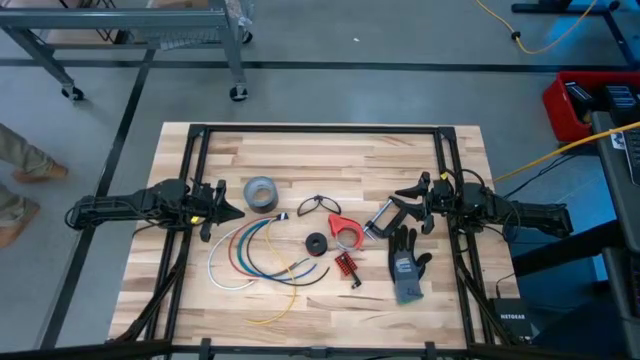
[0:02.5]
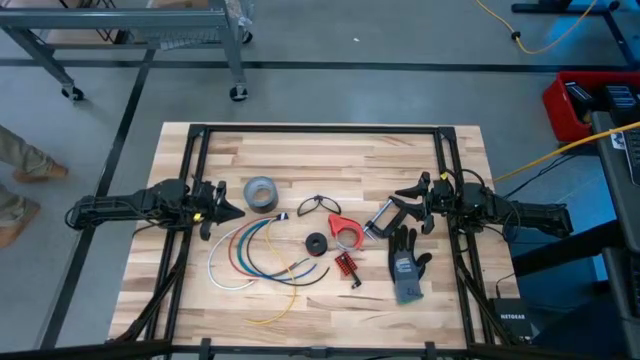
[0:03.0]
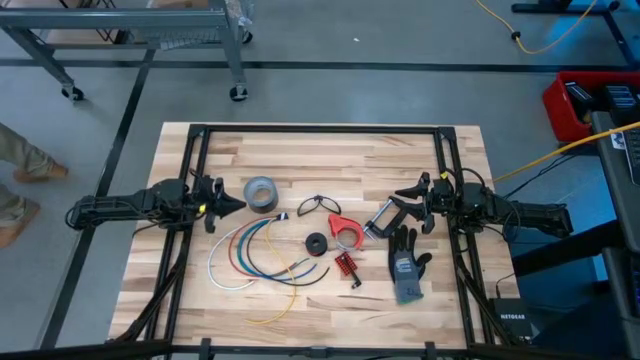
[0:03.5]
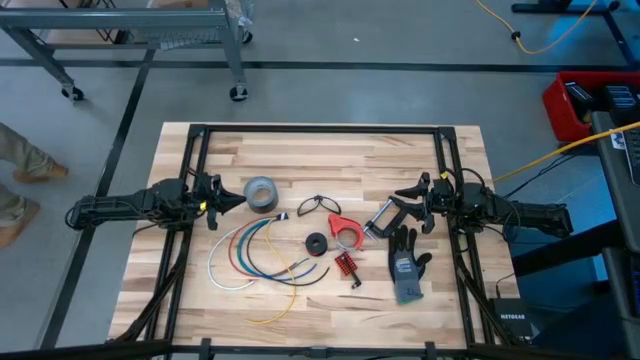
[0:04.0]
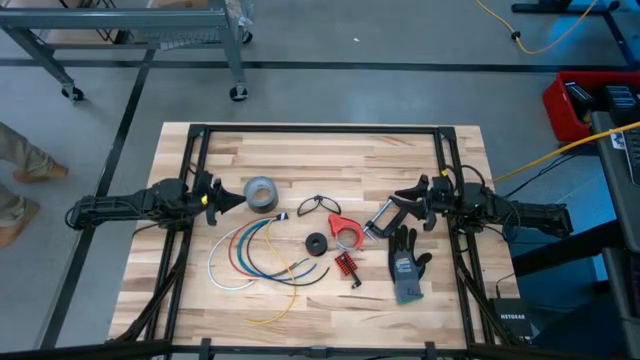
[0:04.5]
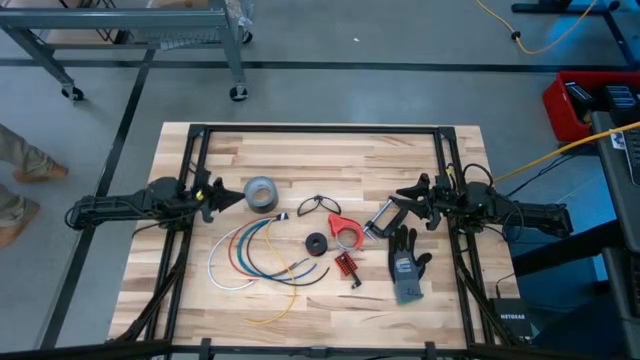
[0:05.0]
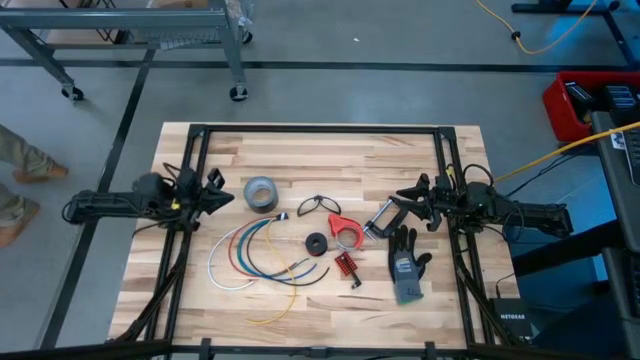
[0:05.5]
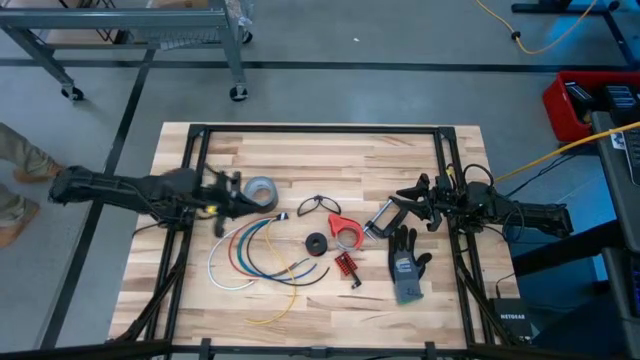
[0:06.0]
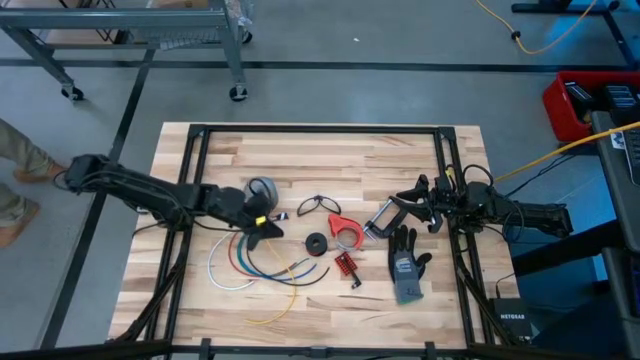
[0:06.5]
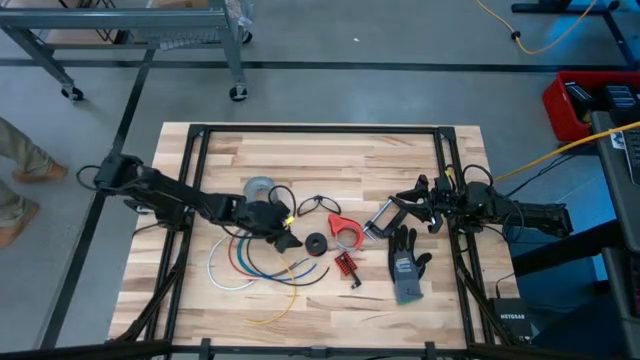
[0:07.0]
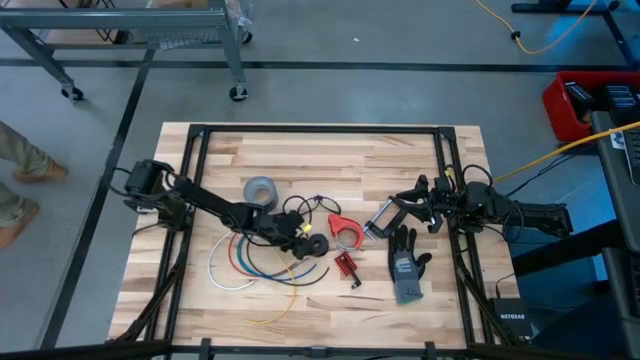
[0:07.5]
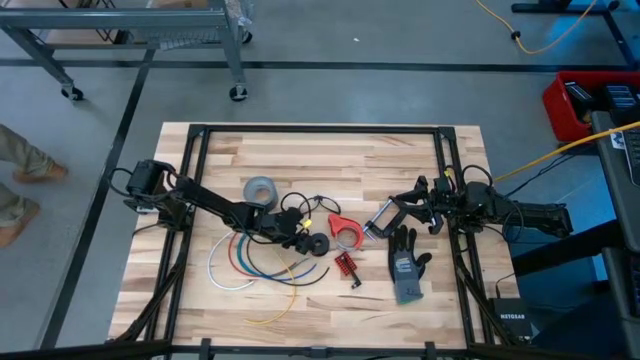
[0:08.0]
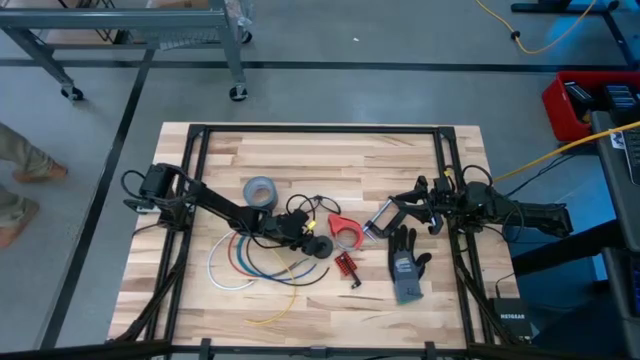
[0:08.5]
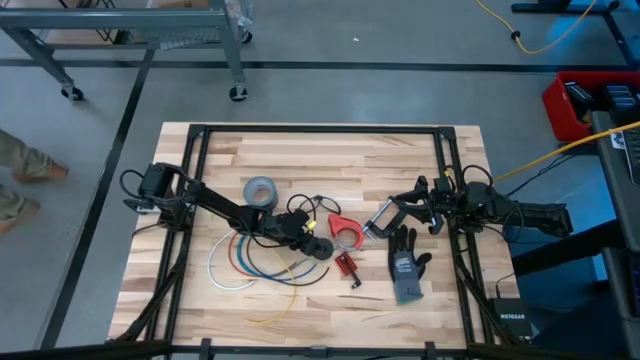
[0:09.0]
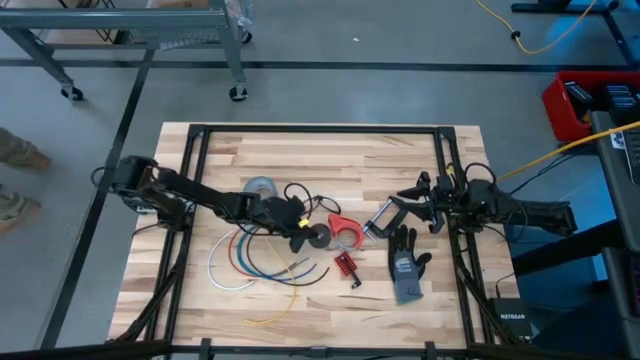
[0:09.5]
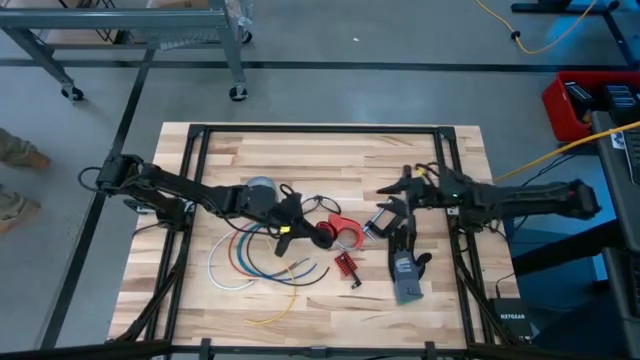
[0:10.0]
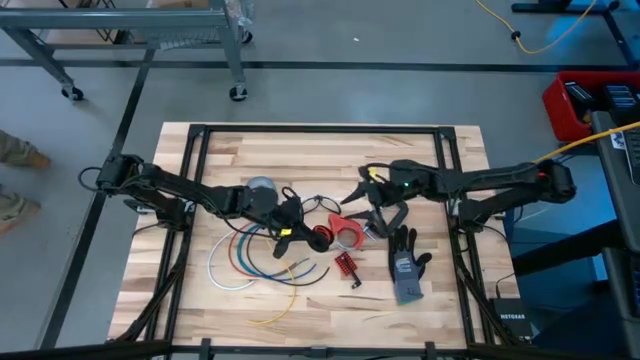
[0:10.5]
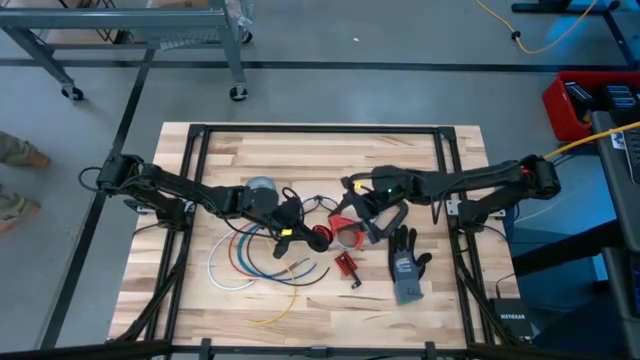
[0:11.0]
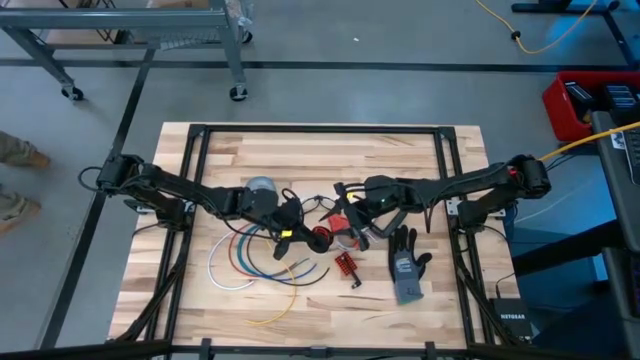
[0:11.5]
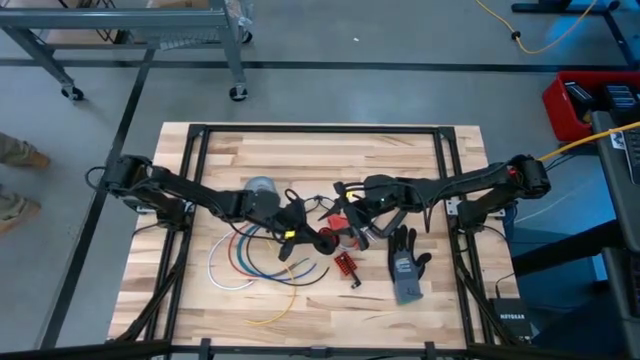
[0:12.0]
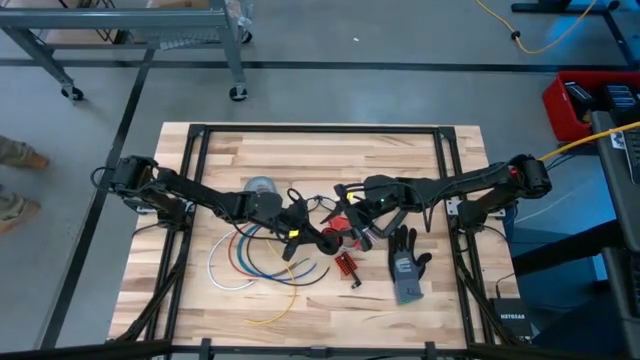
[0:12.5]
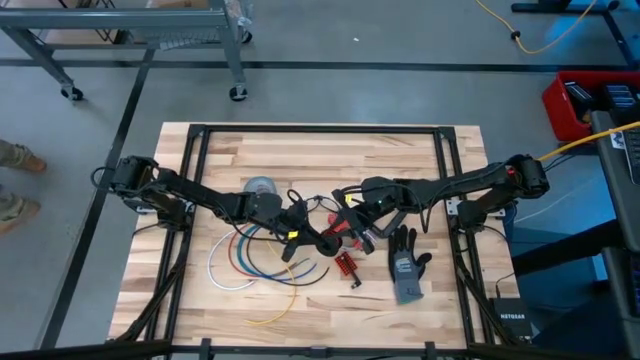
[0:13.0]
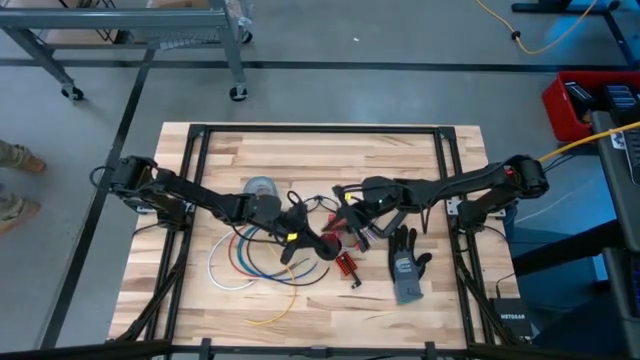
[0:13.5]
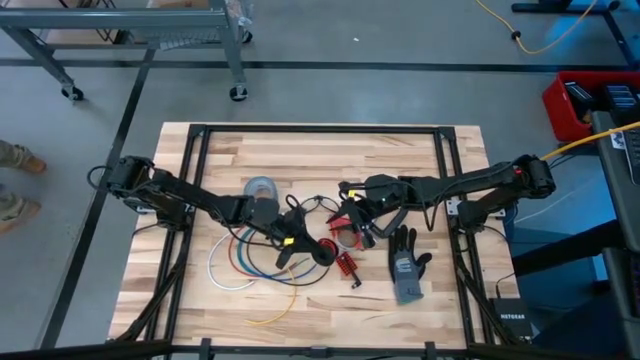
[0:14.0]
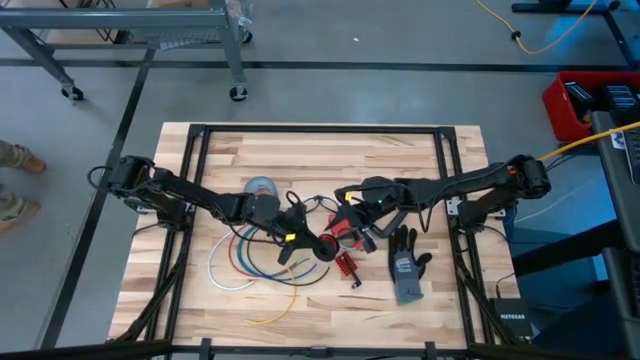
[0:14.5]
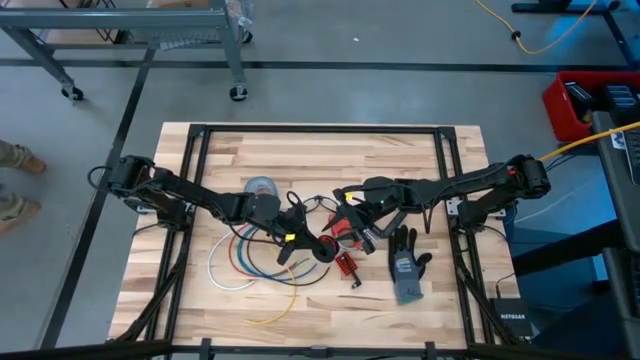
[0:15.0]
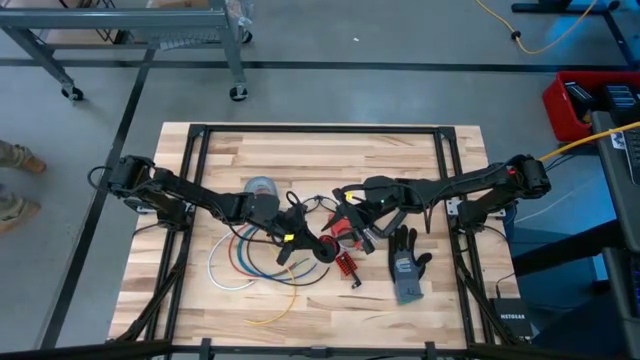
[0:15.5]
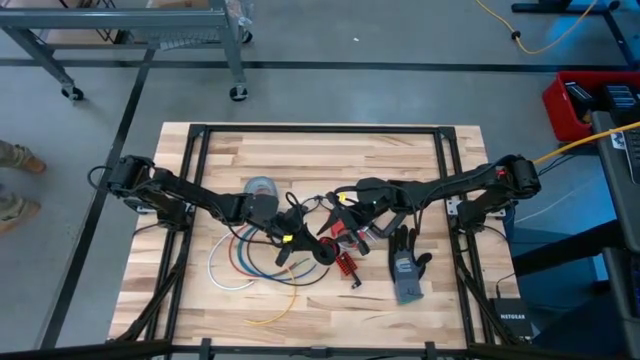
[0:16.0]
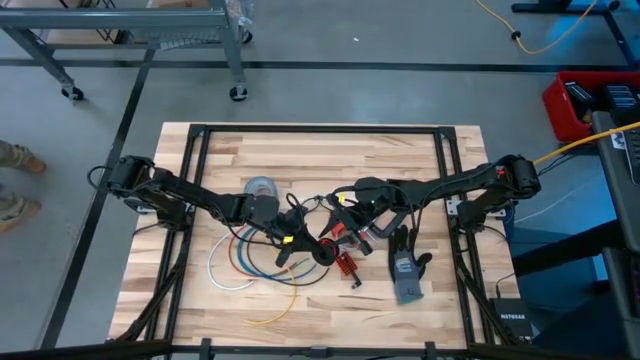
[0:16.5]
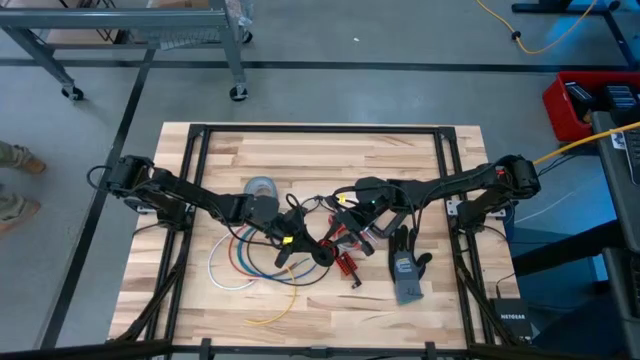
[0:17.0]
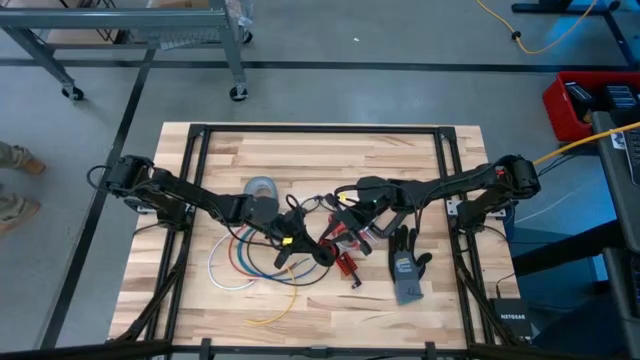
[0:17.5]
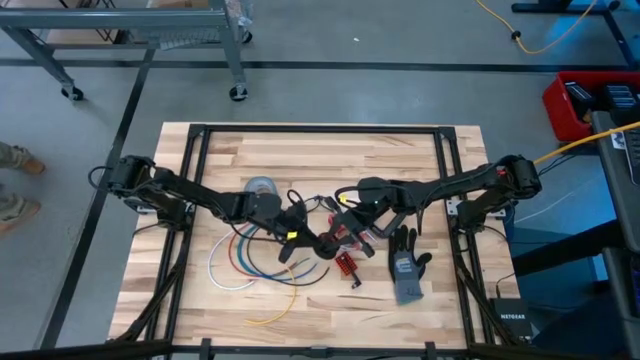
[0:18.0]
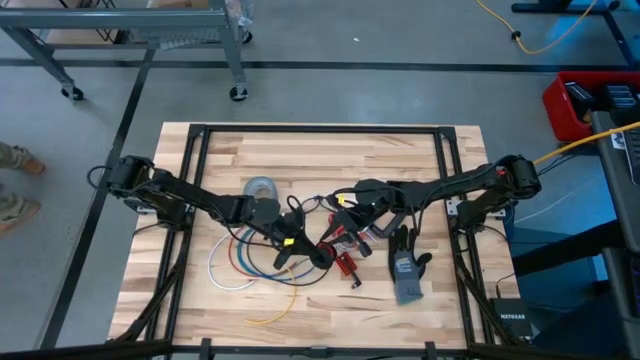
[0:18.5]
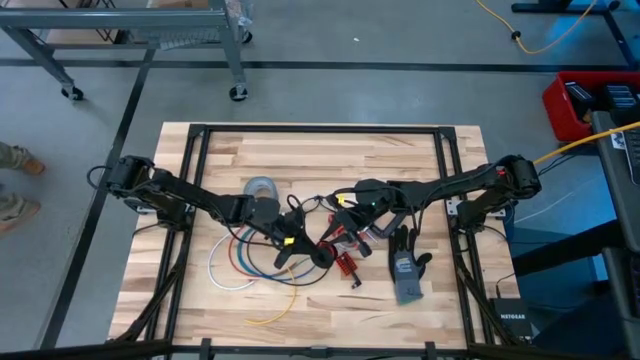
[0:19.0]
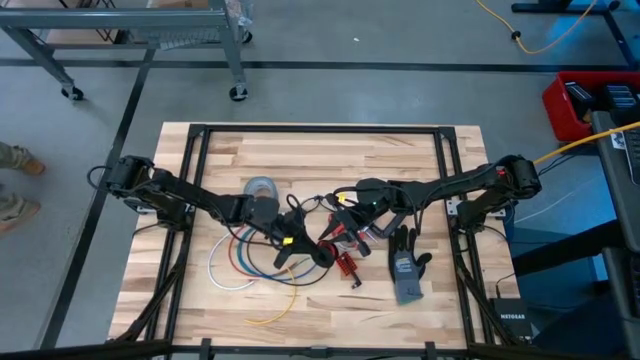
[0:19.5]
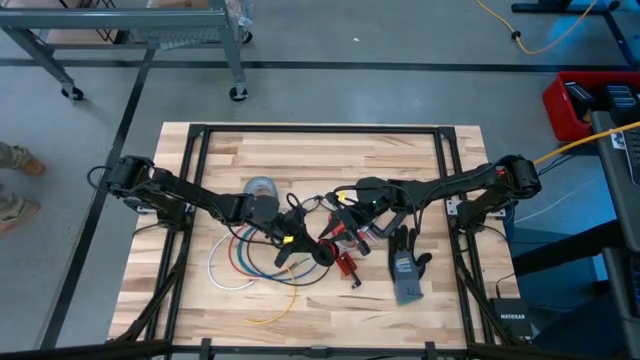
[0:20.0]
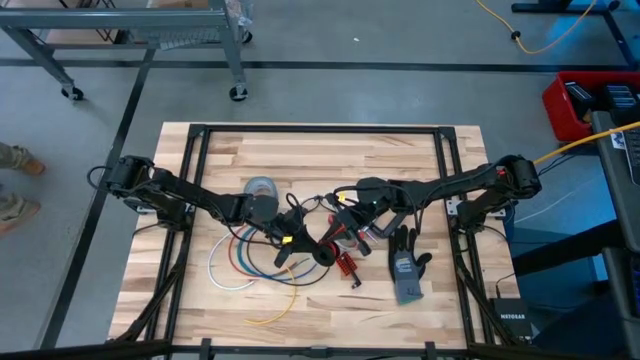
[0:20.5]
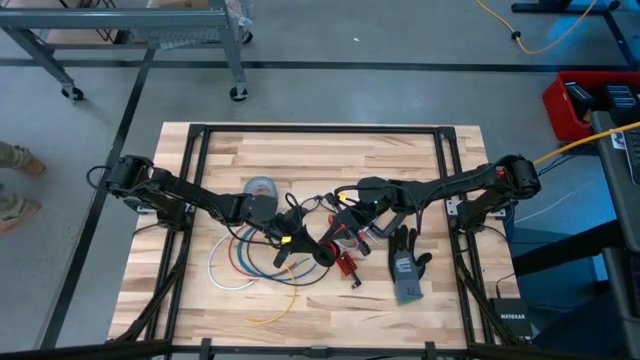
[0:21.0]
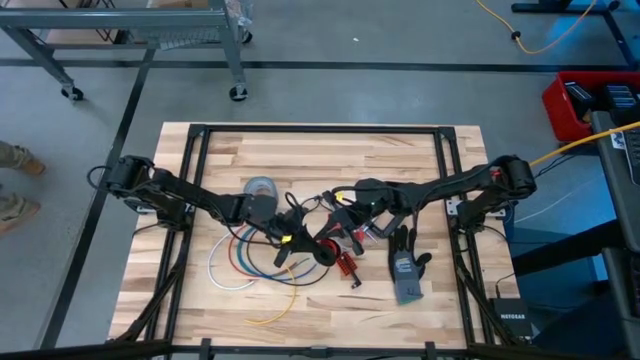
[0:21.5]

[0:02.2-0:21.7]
Task: Coil cords
Uncoil the red wire from the spool
